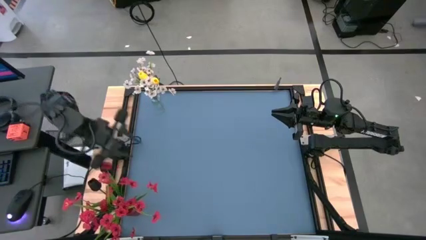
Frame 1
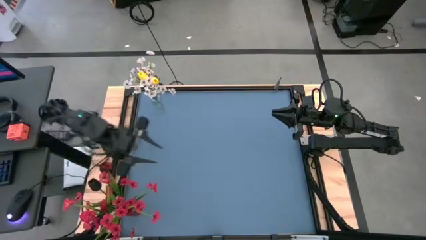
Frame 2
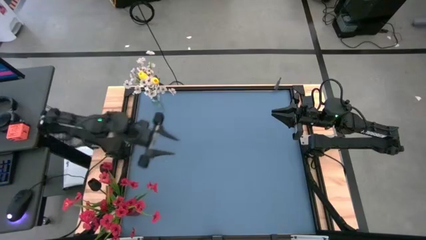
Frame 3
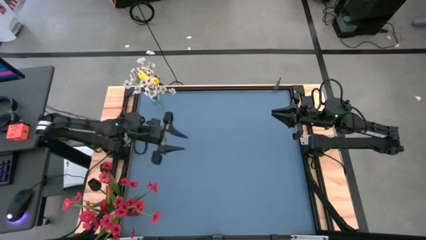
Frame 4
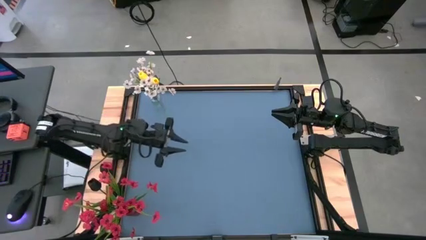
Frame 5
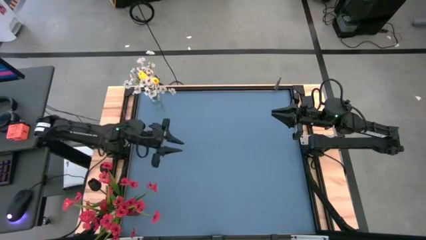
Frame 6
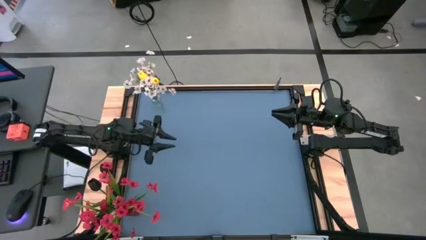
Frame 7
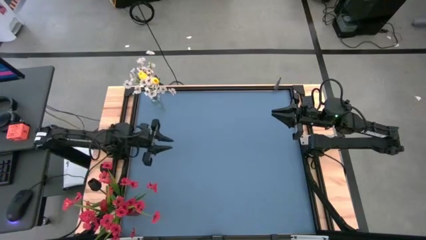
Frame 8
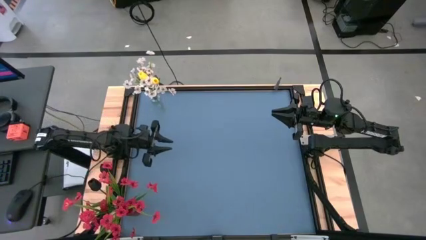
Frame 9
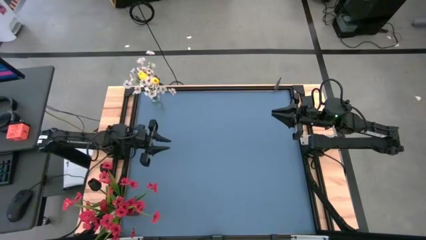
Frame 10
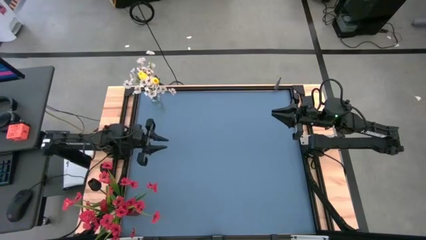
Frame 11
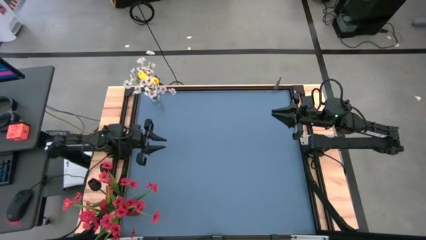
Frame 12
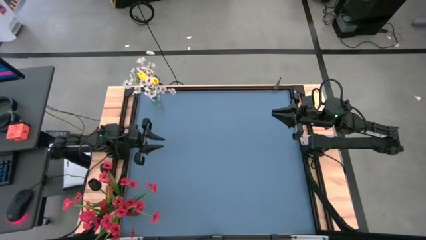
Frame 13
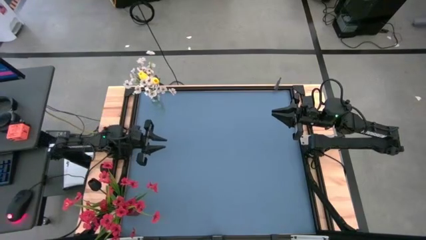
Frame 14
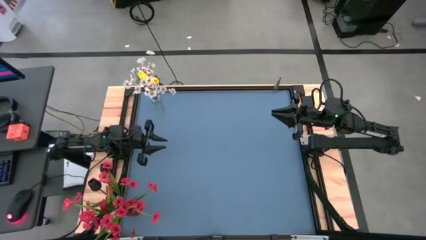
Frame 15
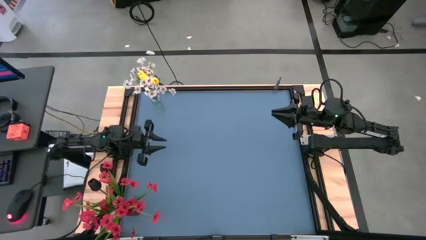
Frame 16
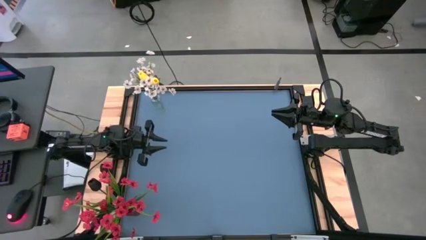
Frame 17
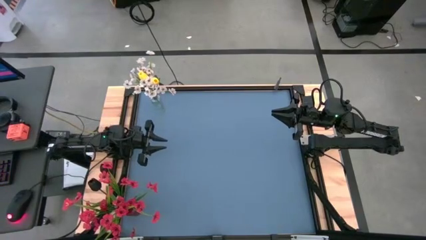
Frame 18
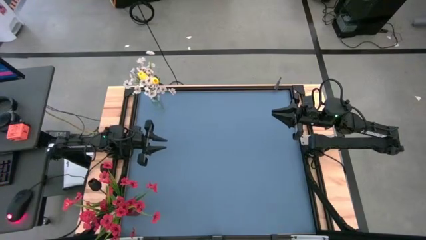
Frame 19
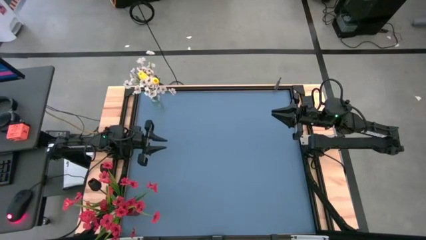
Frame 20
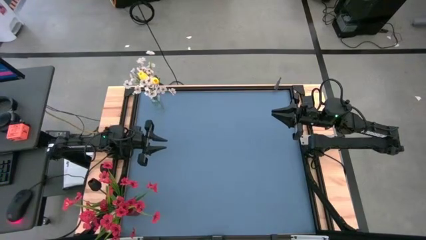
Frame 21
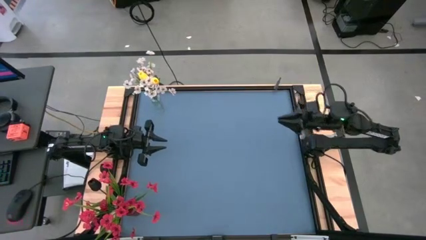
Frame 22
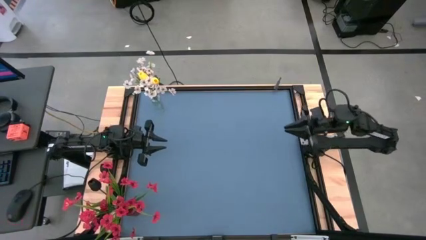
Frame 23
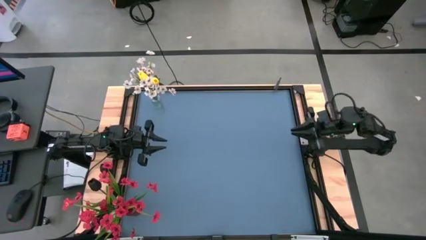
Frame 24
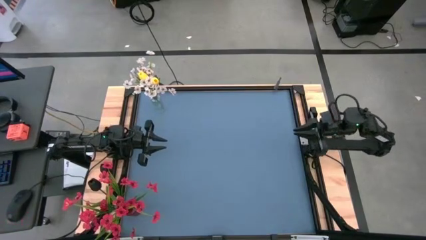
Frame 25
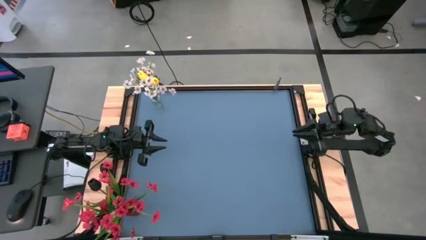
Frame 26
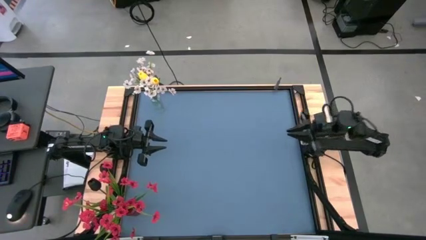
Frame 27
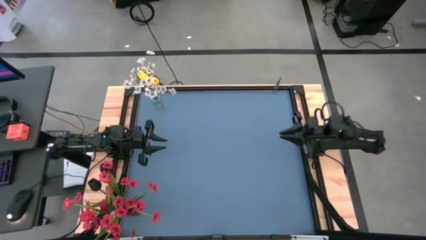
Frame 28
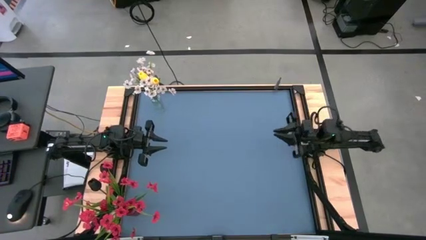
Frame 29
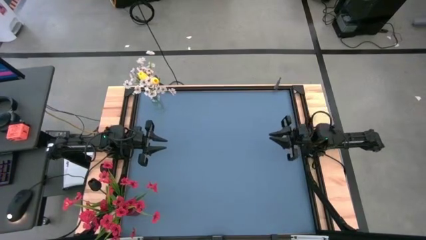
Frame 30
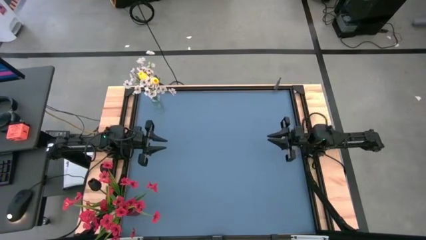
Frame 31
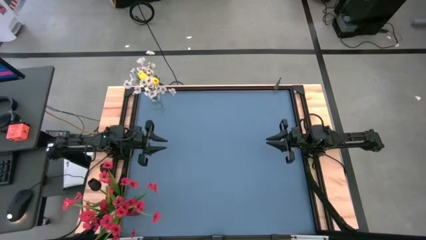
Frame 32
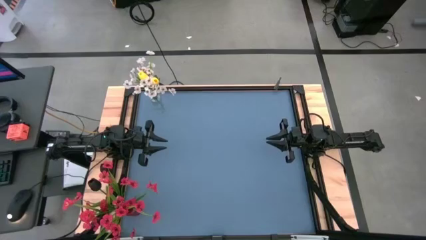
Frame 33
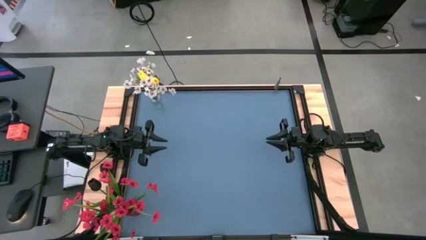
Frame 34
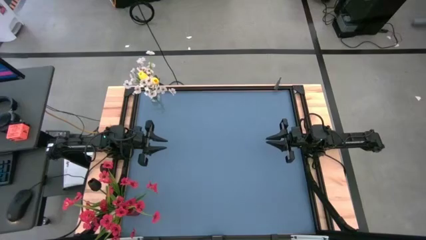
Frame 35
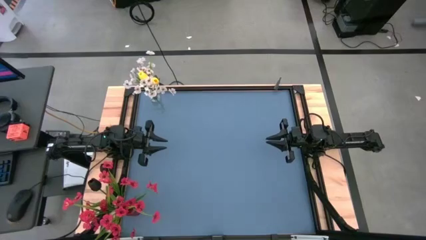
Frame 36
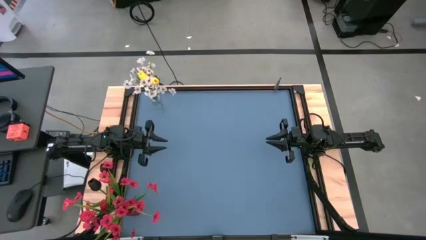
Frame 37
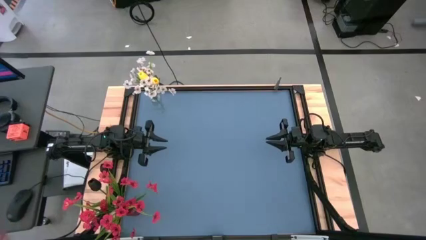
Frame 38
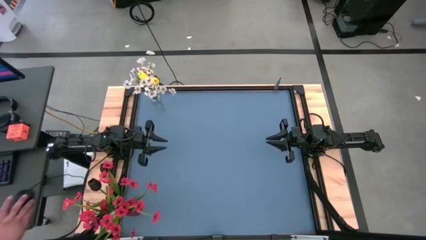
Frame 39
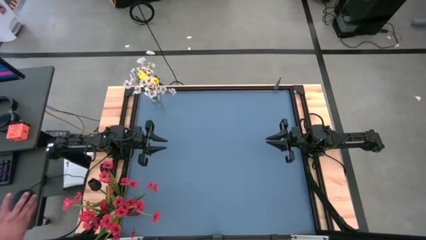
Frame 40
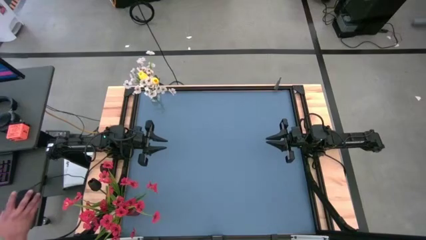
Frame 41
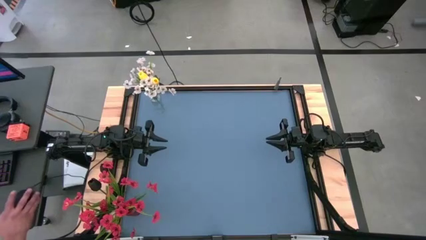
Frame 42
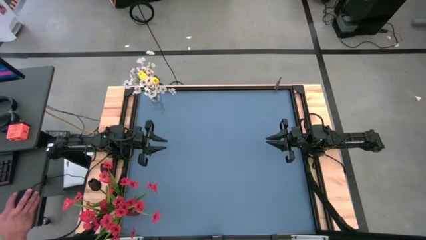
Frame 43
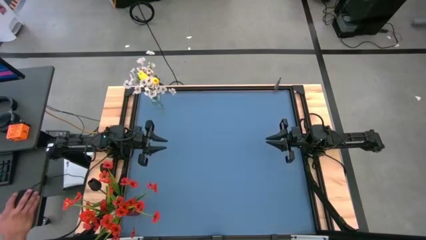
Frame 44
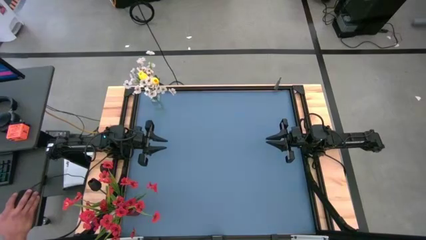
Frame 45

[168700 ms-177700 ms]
Task: Sort flowers into vase by color
Return to Home Position

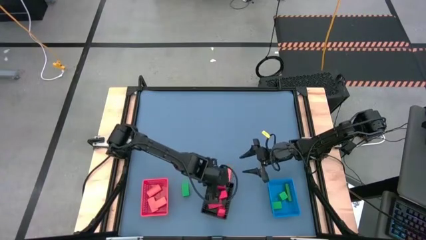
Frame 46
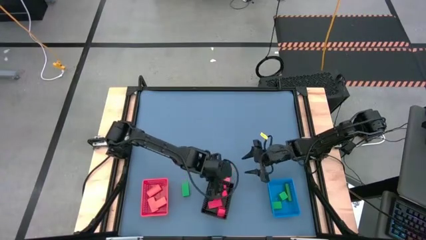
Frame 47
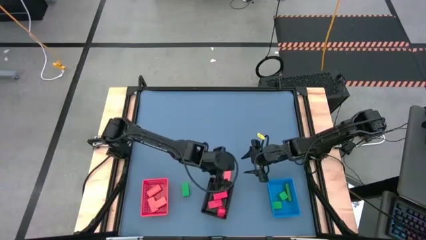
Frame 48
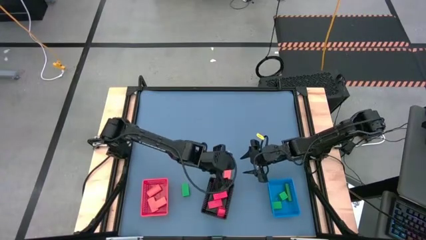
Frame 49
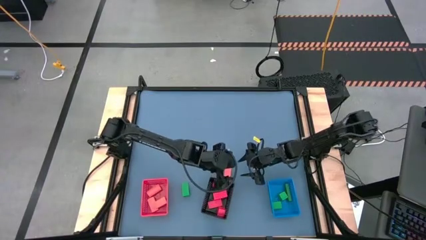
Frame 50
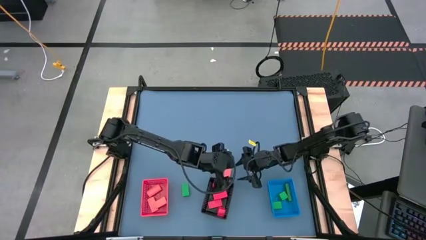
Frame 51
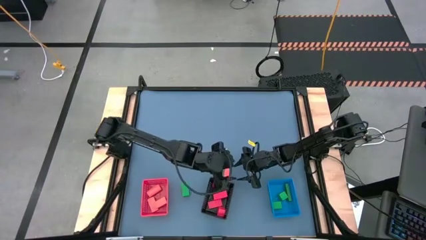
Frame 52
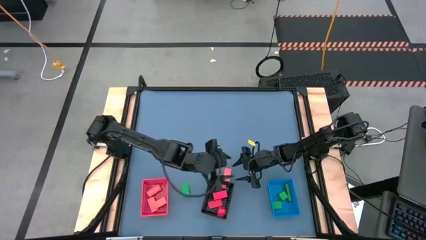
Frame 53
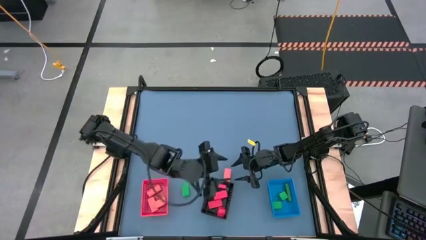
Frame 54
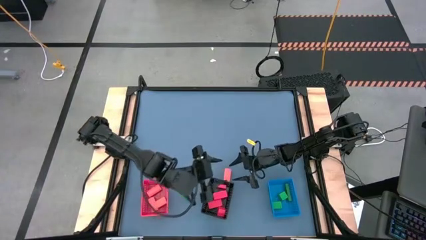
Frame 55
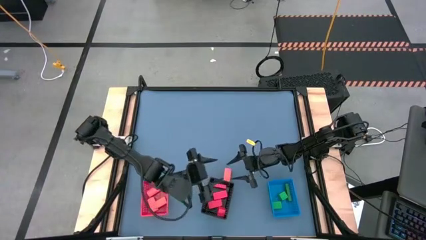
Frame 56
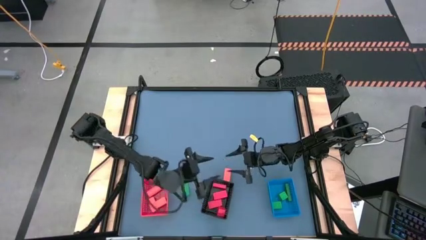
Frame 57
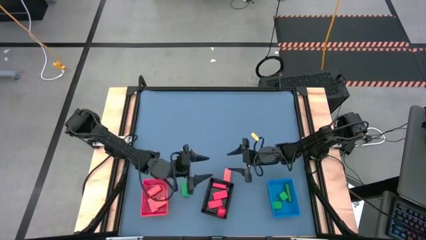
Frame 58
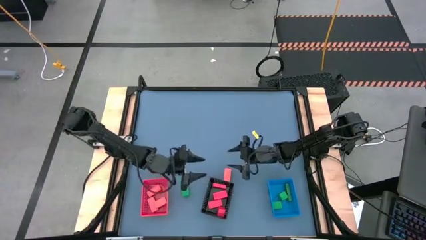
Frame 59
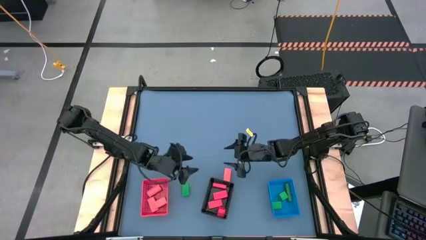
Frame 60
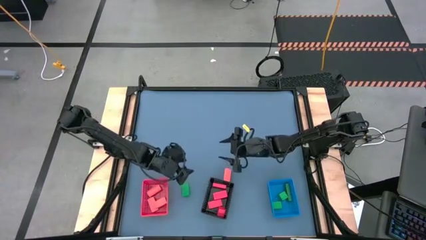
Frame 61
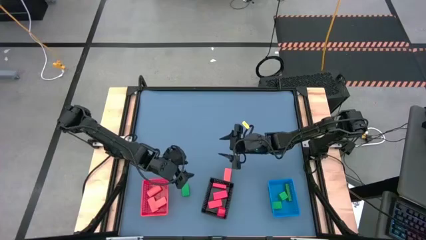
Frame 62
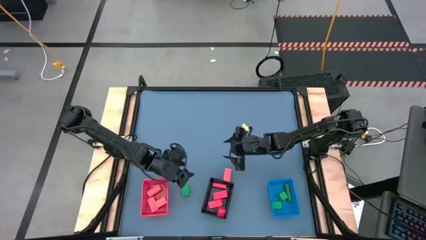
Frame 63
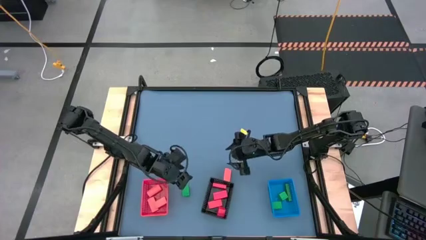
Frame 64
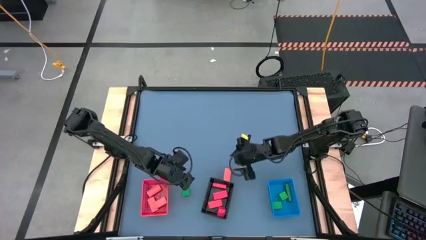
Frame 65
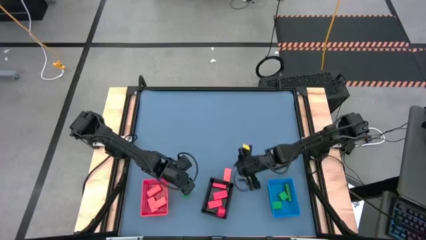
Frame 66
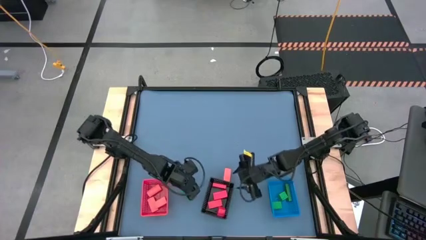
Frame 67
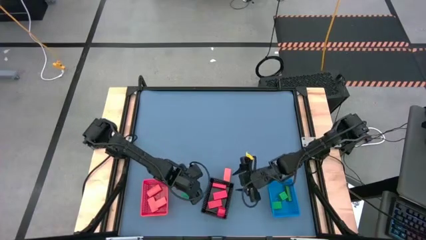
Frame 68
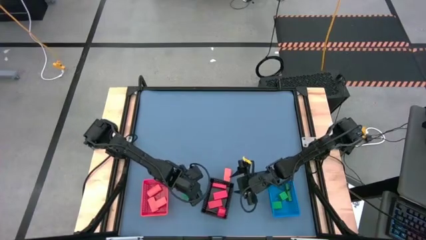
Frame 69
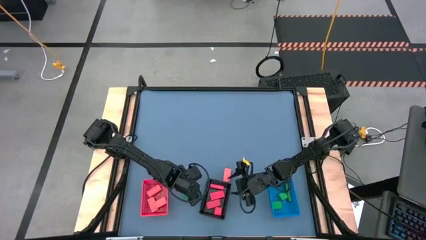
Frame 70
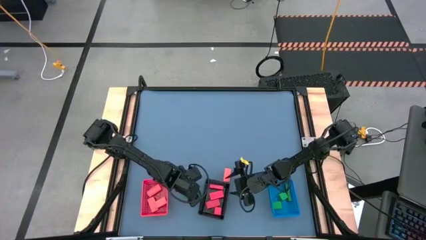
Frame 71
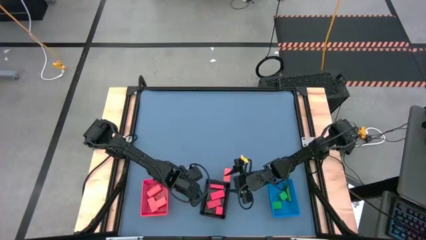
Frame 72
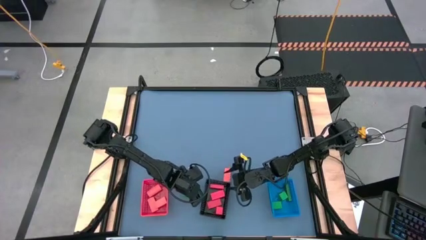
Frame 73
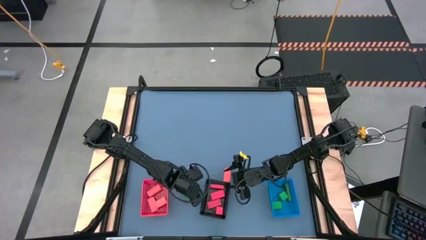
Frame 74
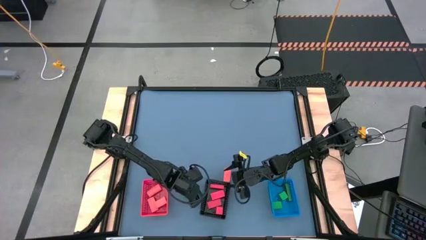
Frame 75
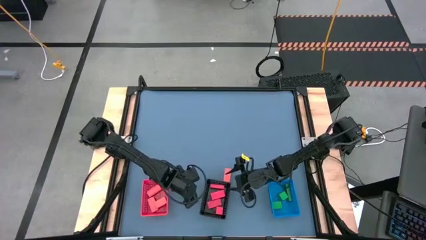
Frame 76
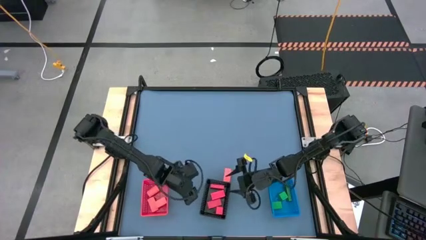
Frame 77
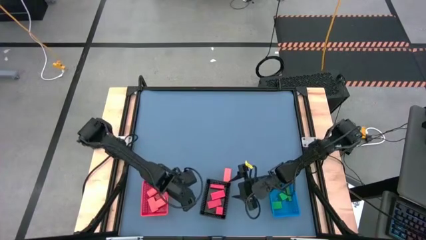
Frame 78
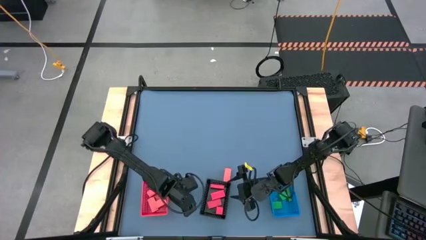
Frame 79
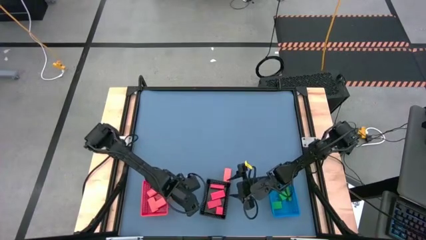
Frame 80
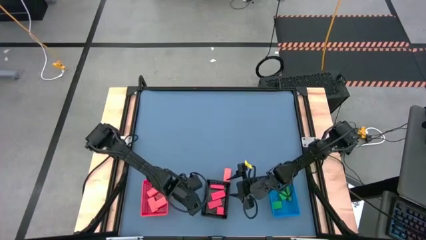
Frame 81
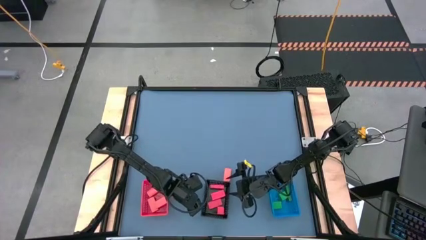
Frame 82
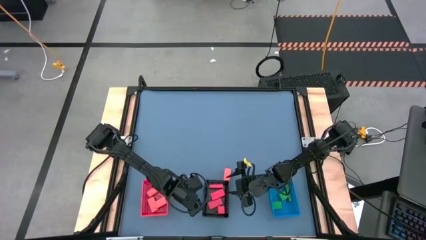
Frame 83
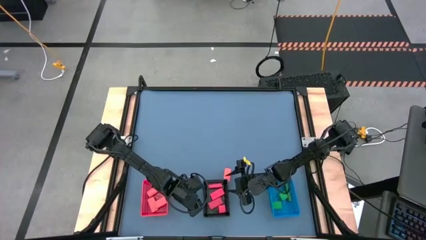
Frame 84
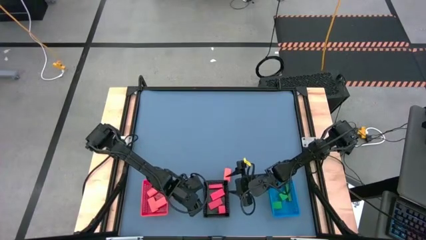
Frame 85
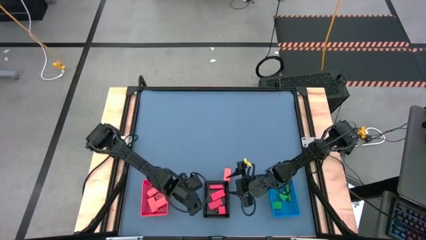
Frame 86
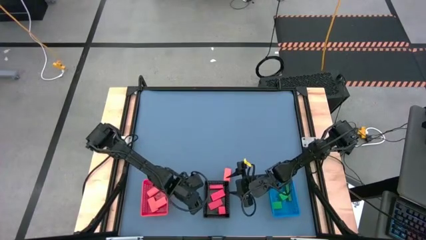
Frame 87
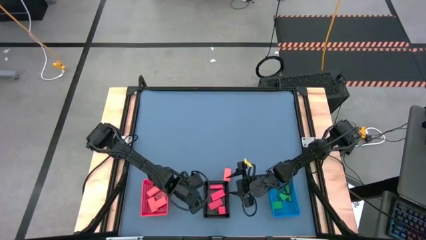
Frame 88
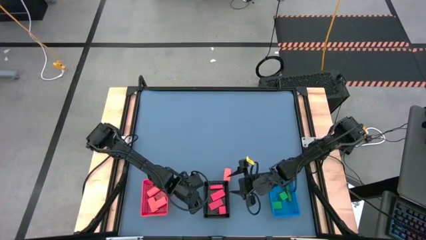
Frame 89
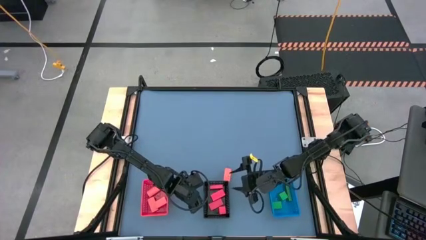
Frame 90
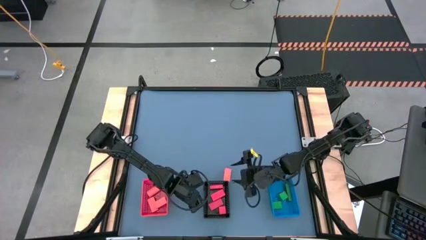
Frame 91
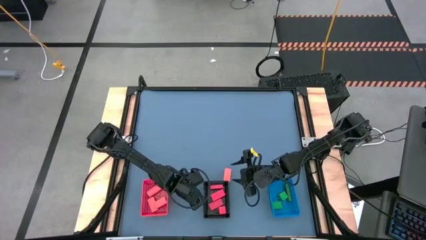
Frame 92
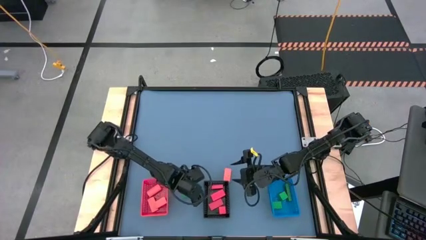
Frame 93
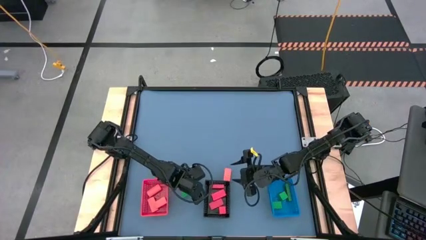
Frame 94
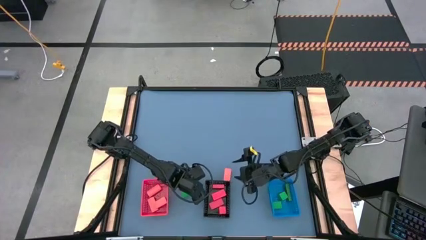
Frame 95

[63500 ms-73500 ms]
Task: Sort & place blocks by color
Adjust the black bin
